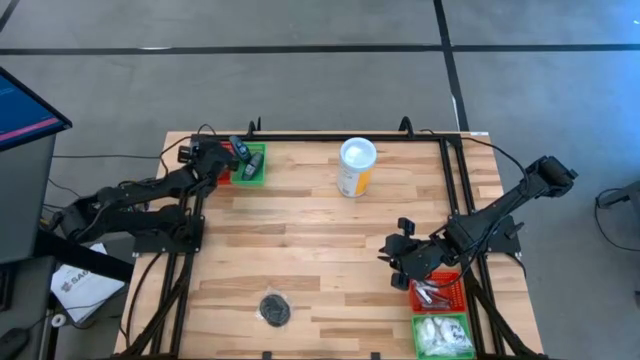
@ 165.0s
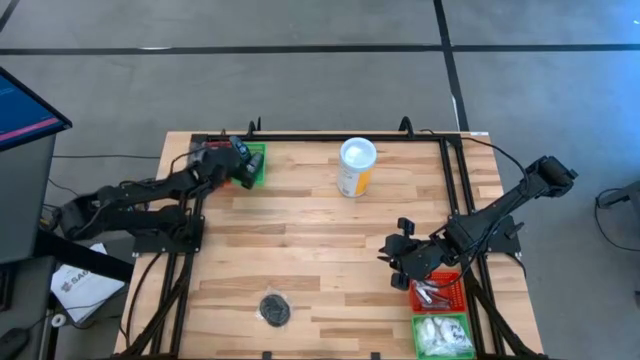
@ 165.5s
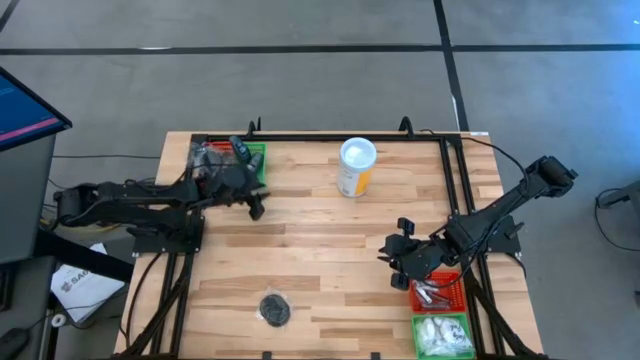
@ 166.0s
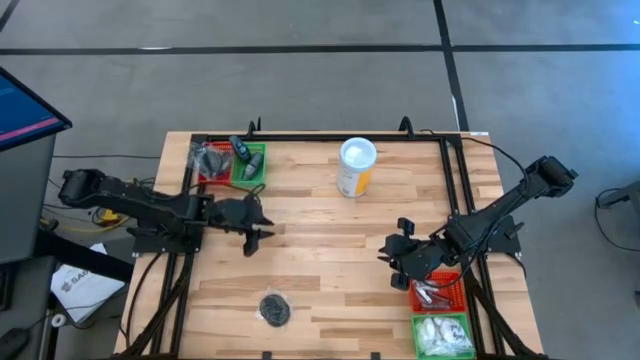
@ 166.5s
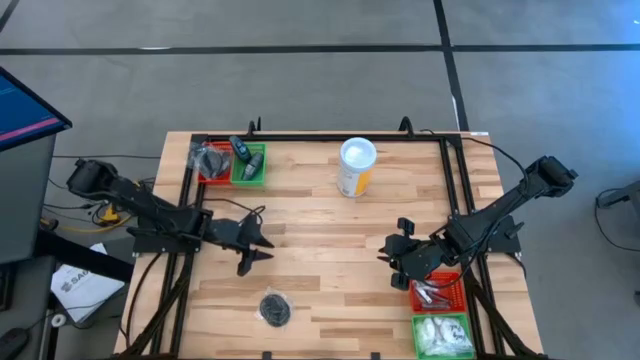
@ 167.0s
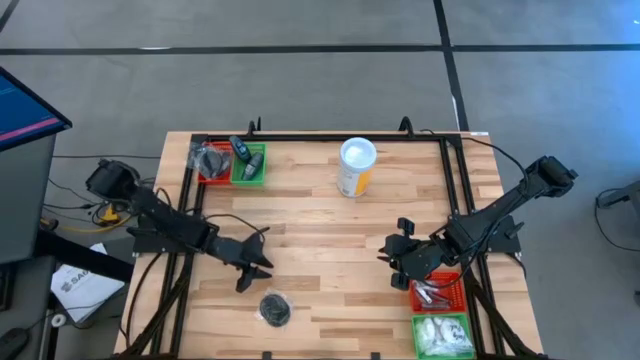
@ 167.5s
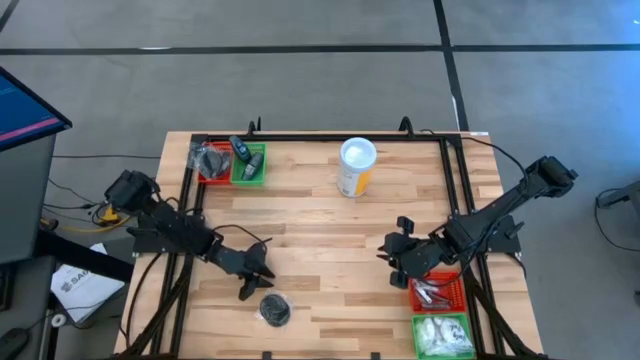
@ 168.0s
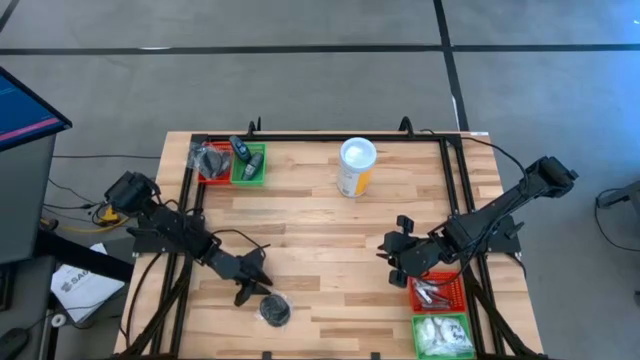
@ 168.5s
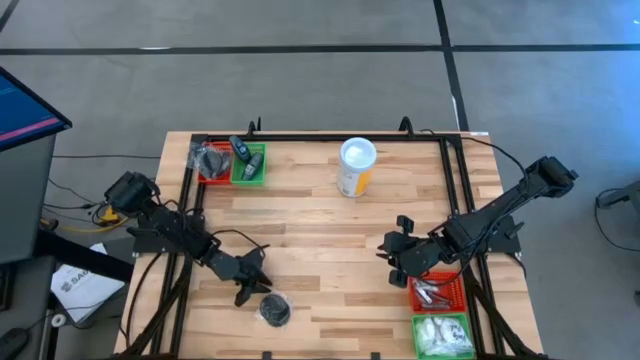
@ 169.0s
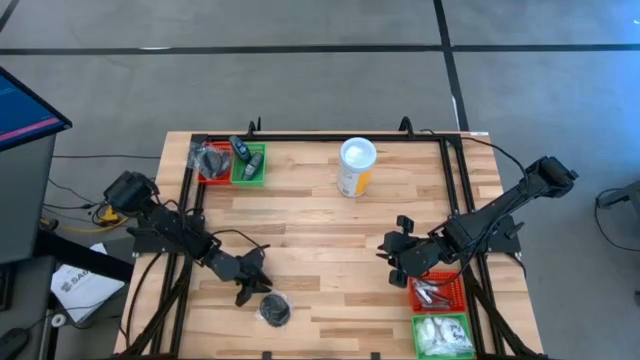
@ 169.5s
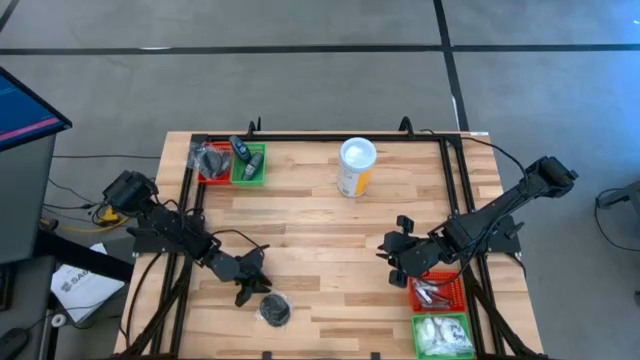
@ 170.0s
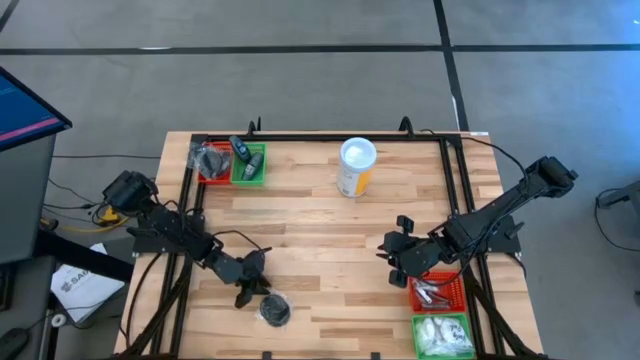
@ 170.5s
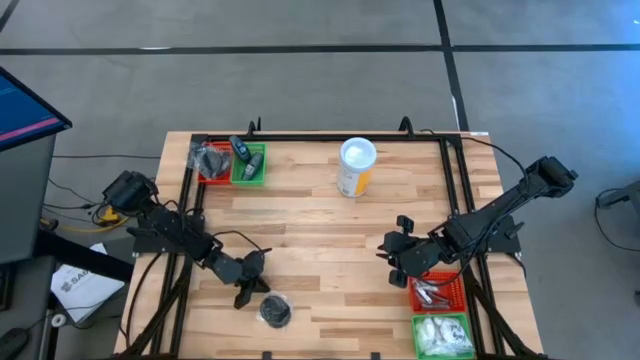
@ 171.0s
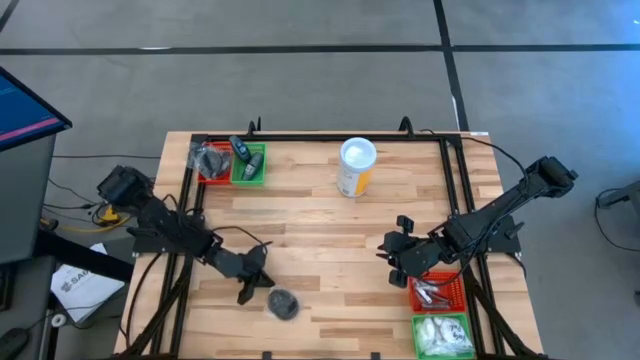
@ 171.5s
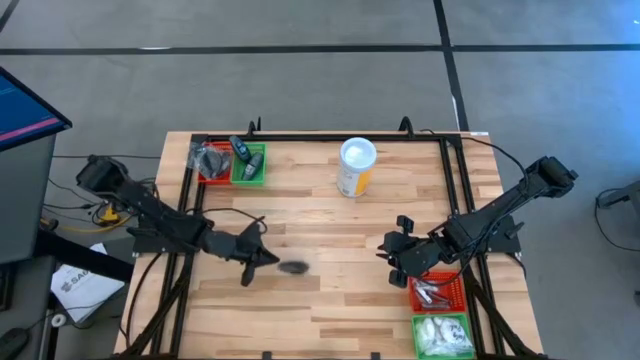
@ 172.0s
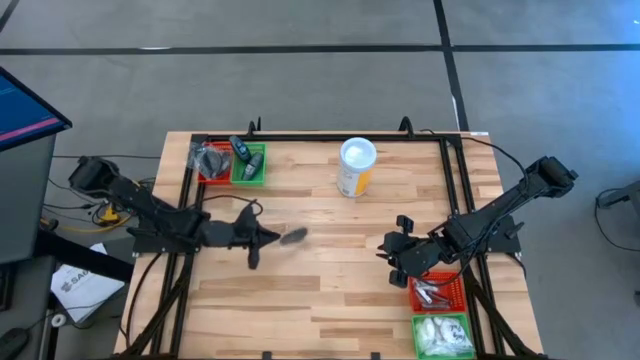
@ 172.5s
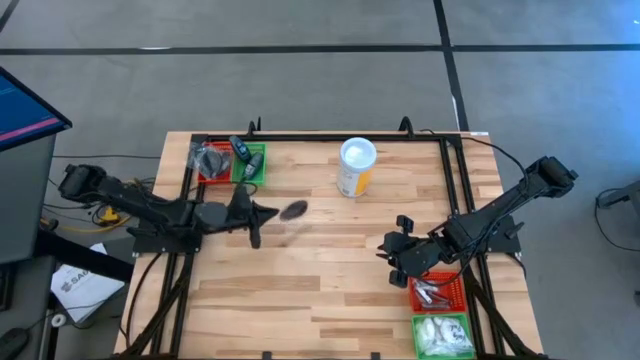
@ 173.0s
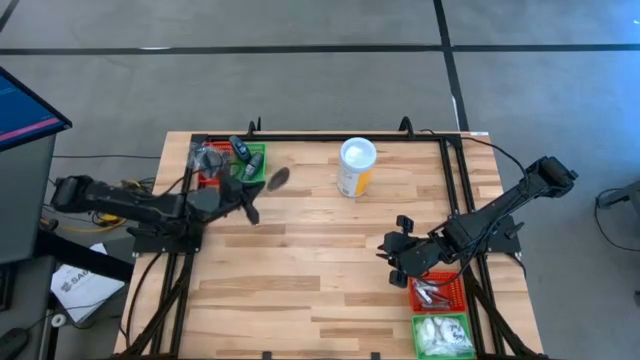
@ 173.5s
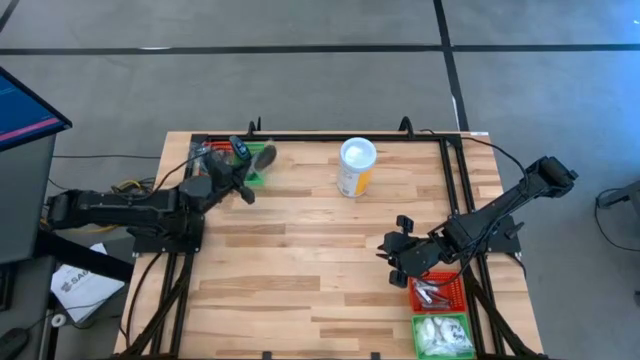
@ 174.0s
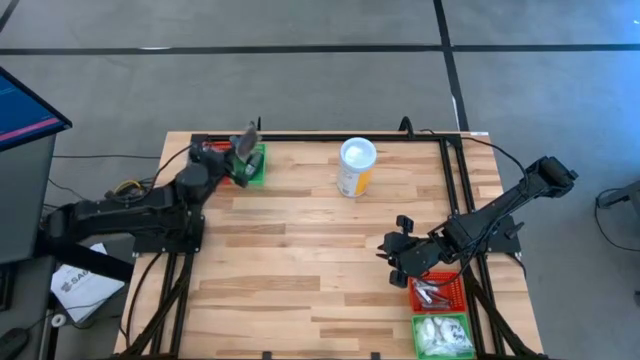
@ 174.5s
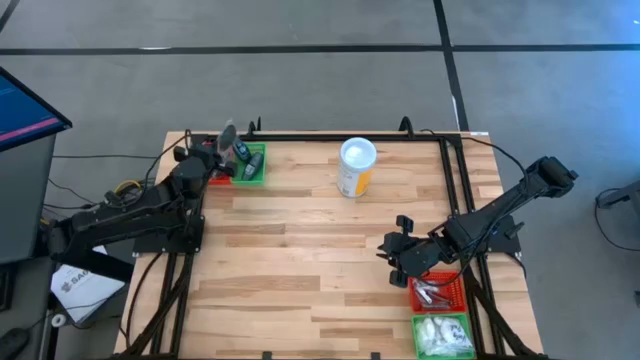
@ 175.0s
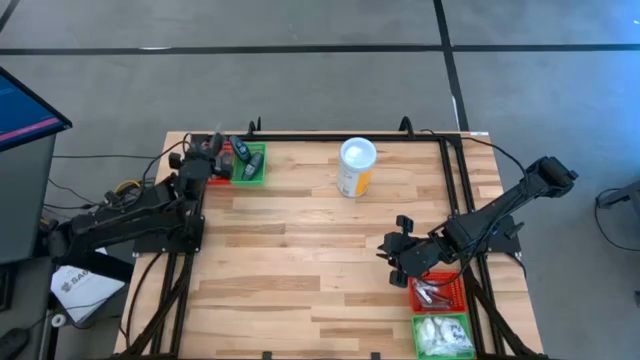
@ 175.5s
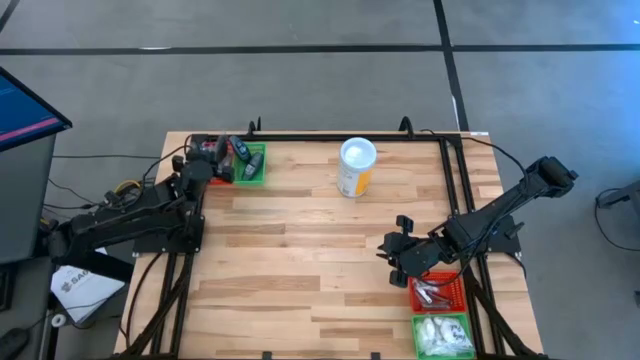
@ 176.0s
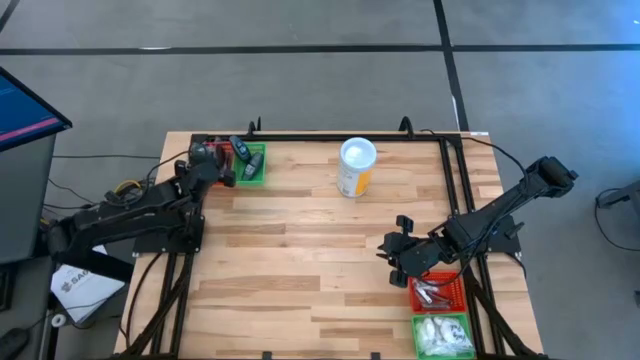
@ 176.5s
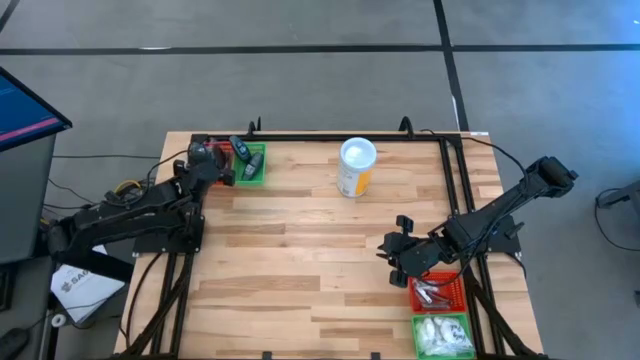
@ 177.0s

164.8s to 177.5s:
Task: Pick & Place Travel size toiletries
Put the black hairbrush into the top red bin

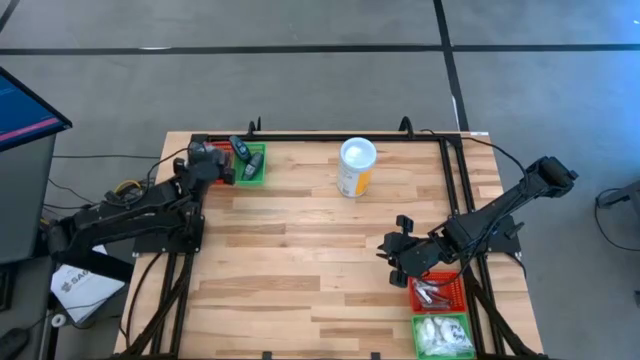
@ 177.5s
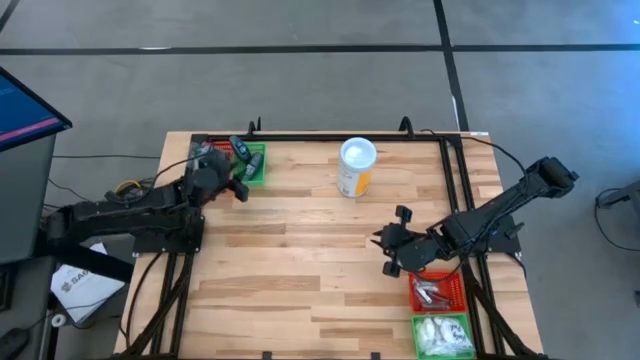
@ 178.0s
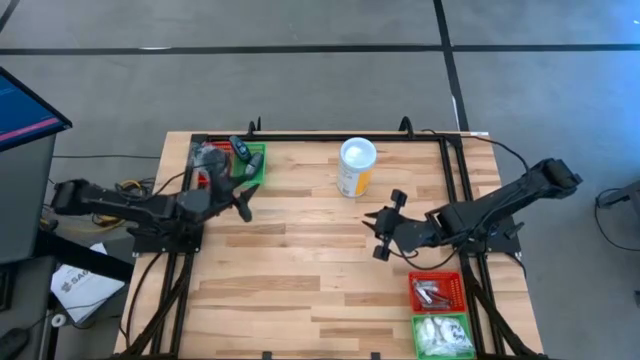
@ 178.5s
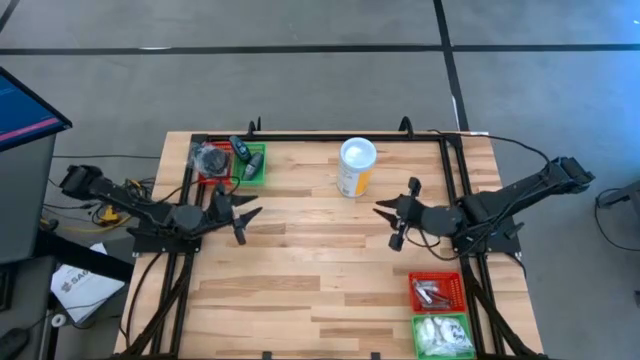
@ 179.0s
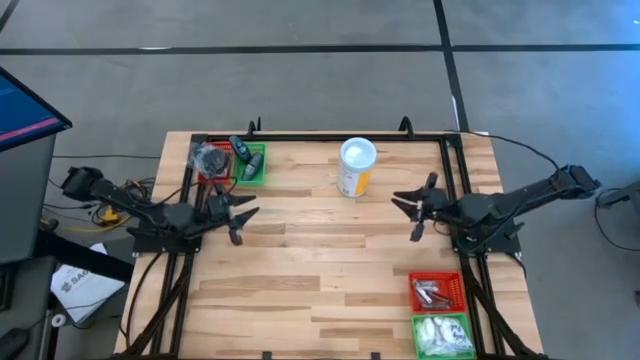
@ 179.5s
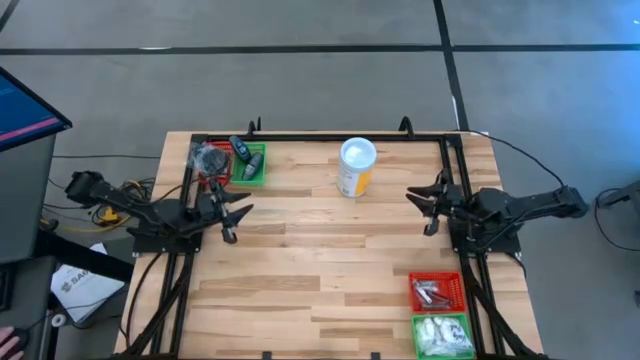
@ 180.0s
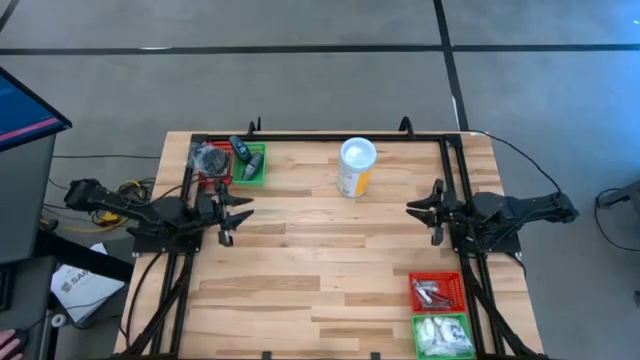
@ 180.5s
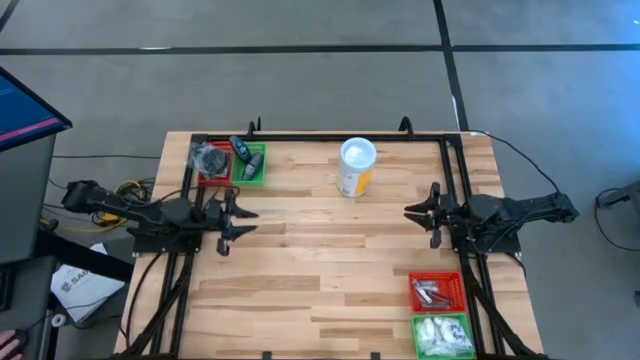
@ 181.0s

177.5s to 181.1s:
Return to Home Position

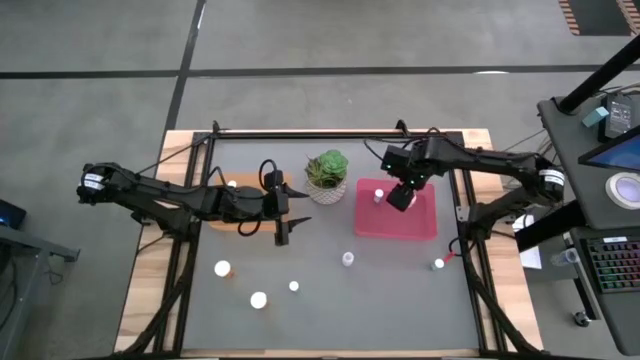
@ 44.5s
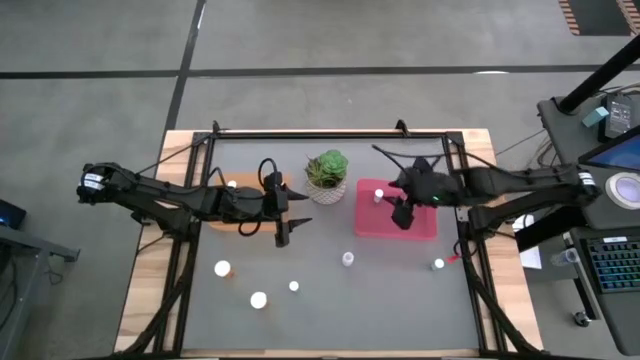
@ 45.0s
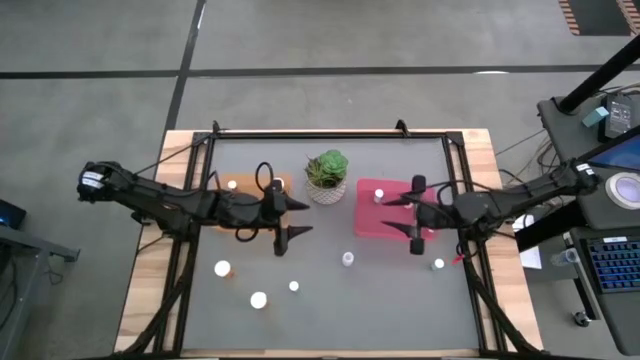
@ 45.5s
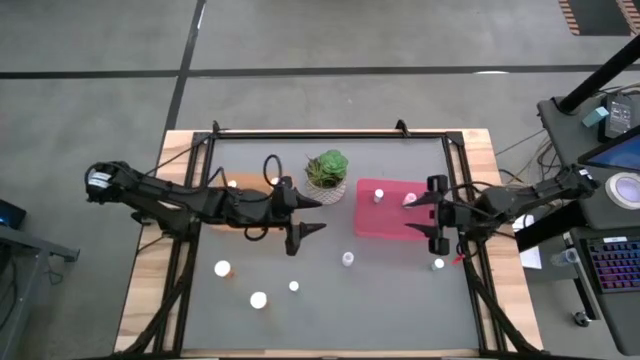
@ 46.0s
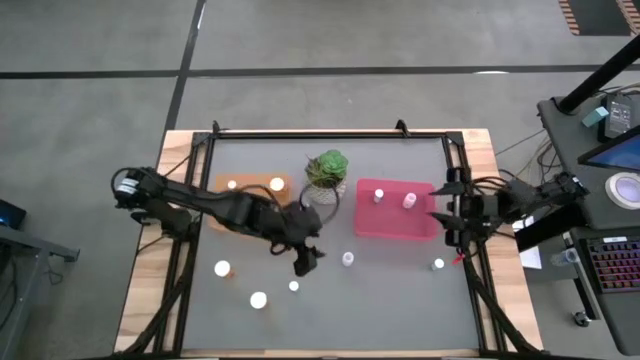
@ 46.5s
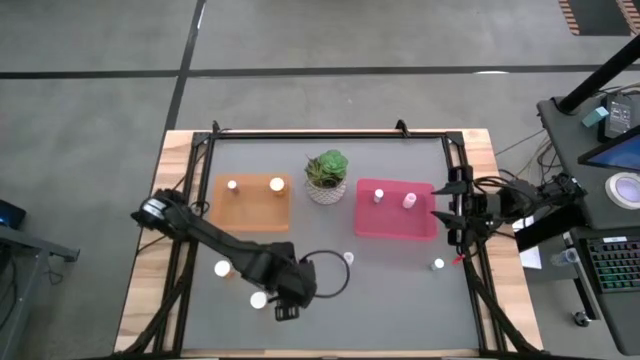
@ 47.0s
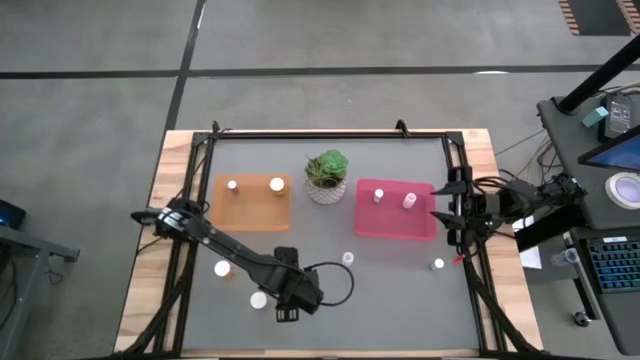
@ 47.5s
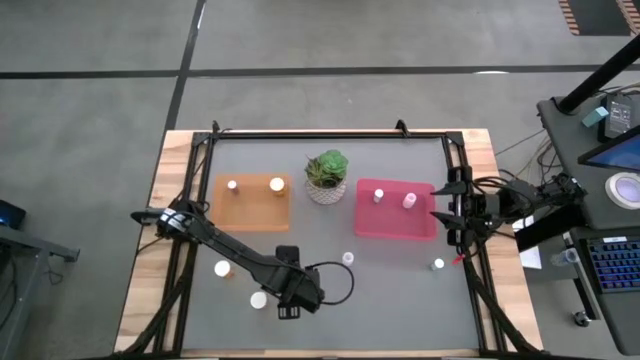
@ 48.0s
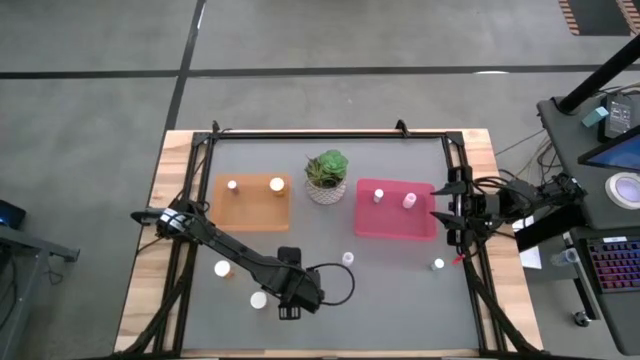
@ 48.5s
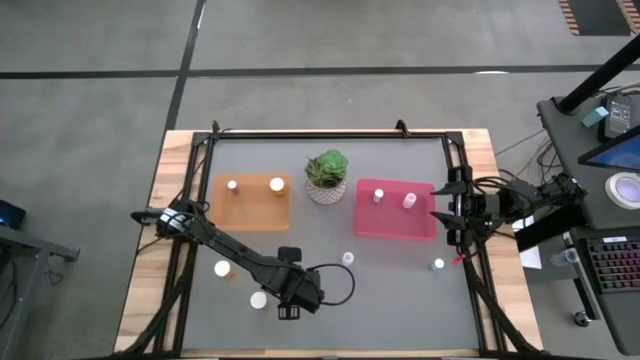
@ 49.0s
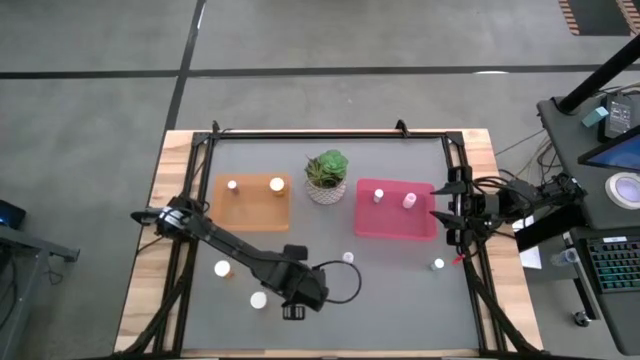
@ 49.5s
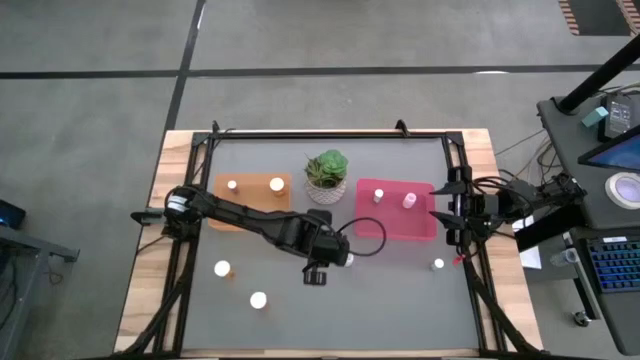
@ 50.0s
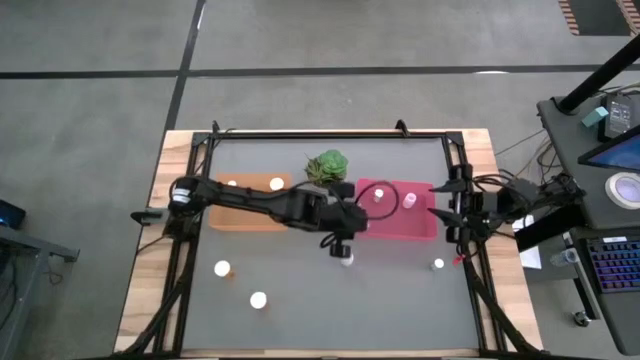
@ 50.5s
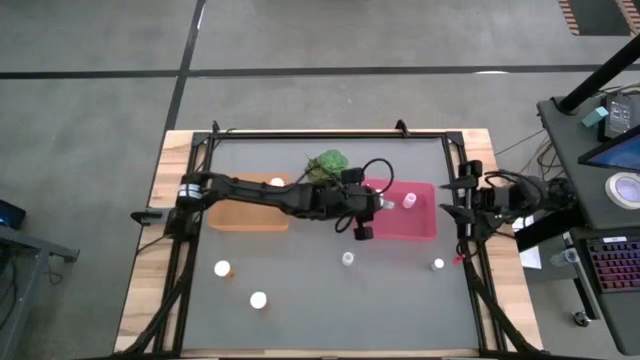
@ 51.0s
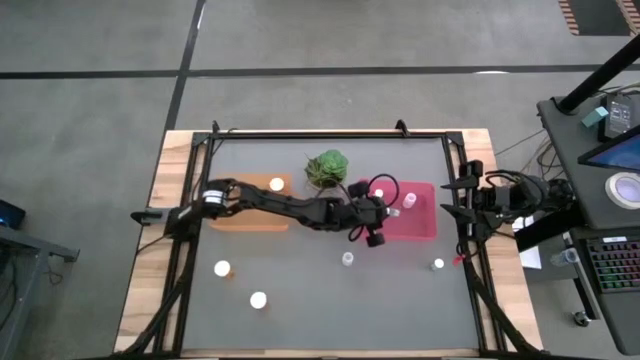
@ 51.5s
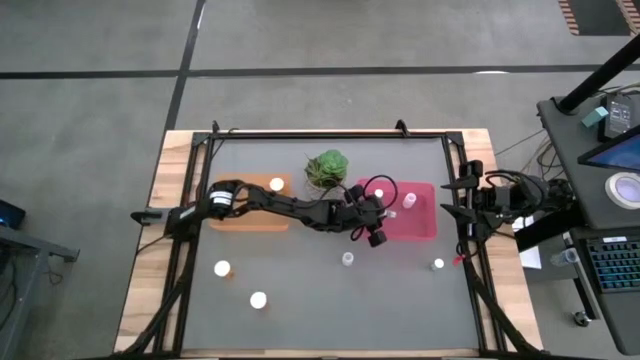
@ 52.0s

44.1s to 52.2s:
Task: Pick and place medicine bottles into bin by pill shape (circle, oval)
Put the left small blue pill bottle in the orange bin
